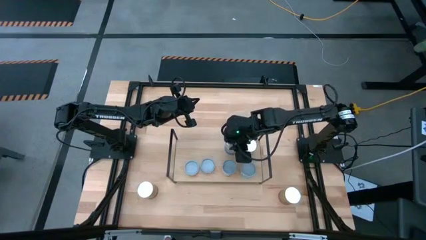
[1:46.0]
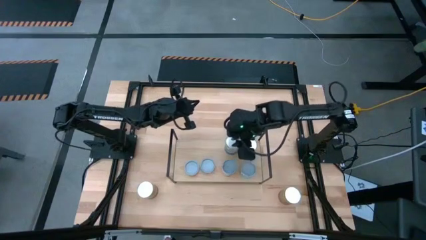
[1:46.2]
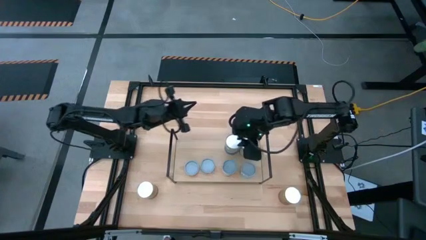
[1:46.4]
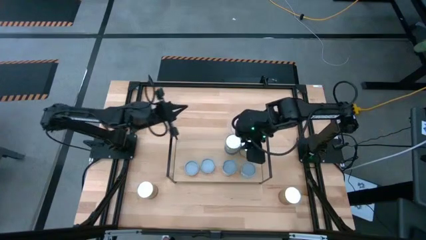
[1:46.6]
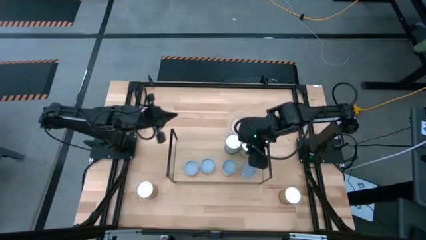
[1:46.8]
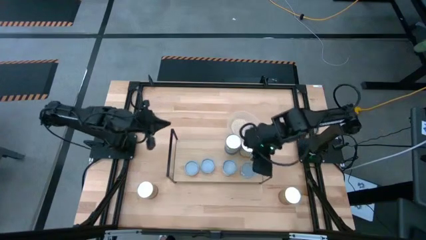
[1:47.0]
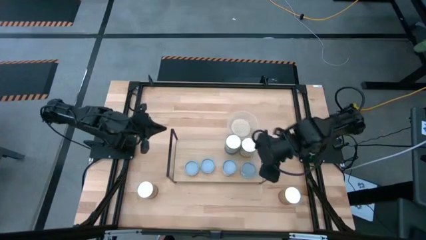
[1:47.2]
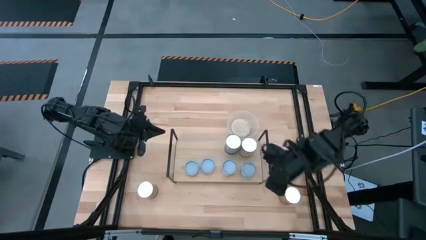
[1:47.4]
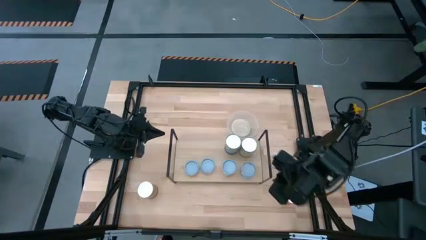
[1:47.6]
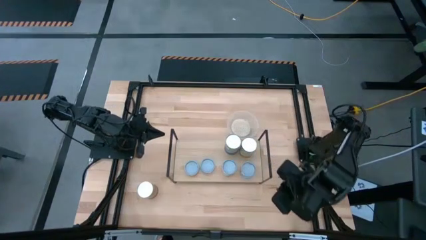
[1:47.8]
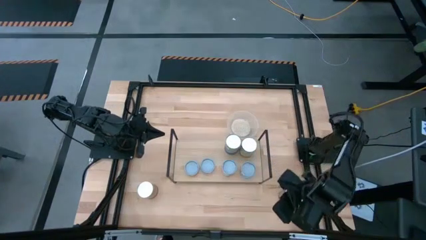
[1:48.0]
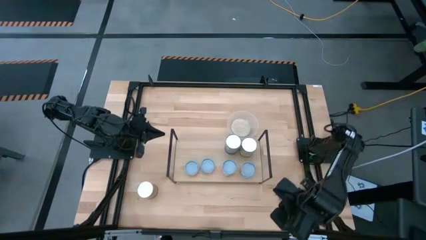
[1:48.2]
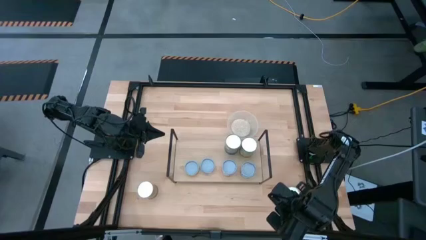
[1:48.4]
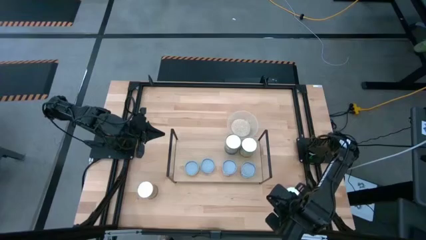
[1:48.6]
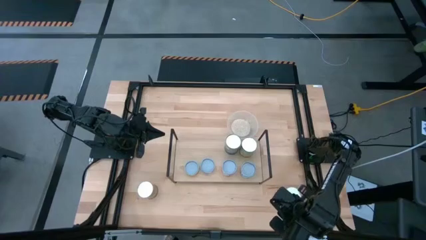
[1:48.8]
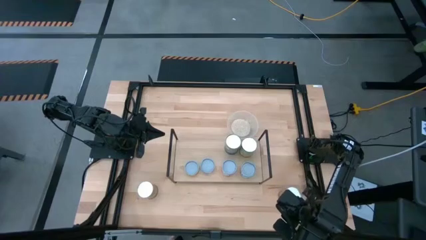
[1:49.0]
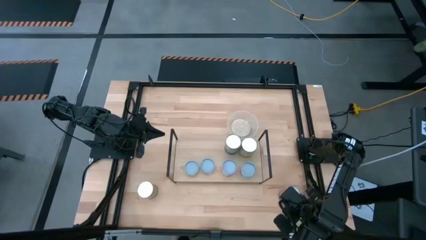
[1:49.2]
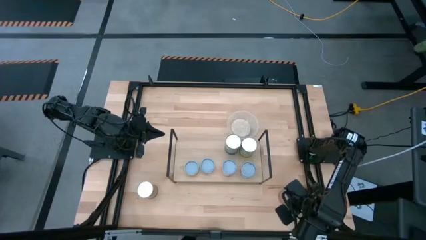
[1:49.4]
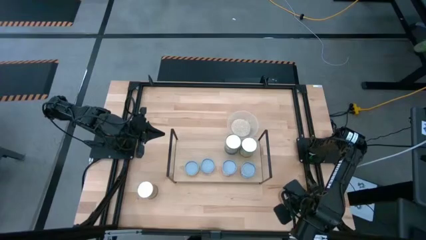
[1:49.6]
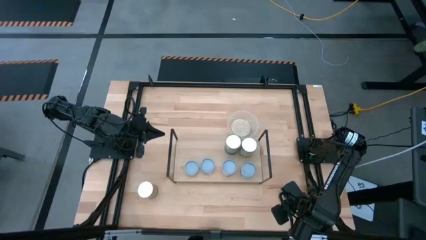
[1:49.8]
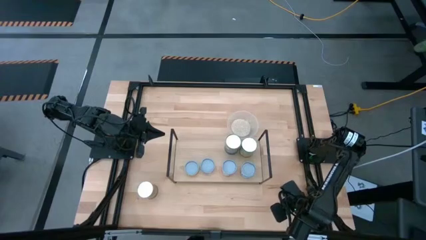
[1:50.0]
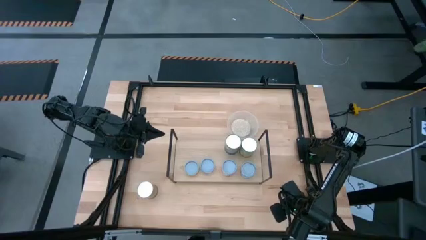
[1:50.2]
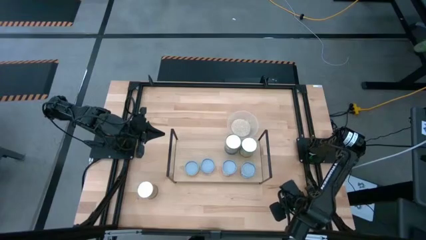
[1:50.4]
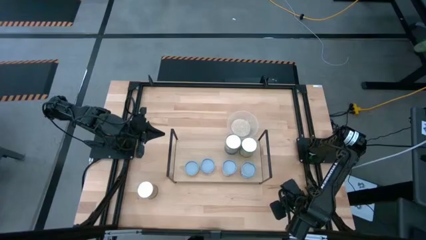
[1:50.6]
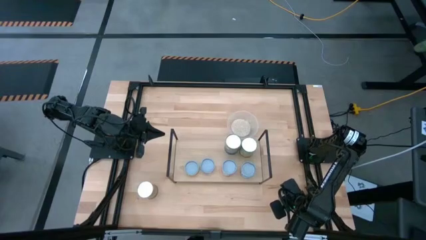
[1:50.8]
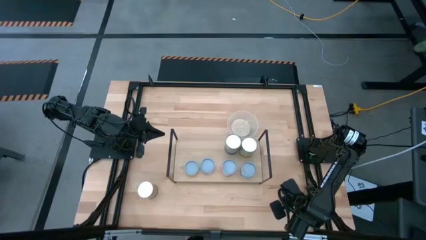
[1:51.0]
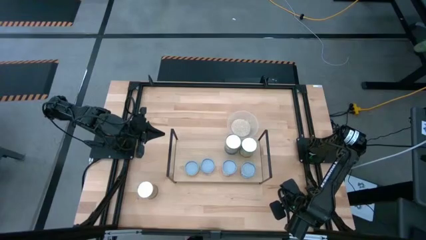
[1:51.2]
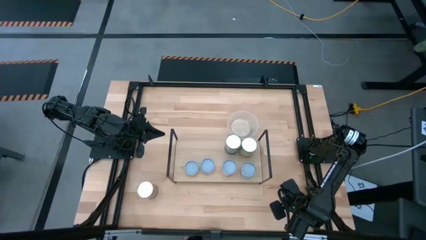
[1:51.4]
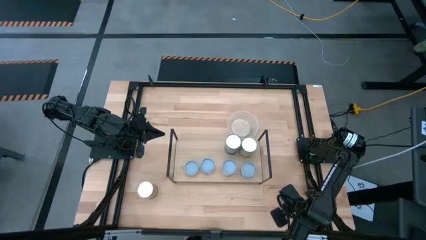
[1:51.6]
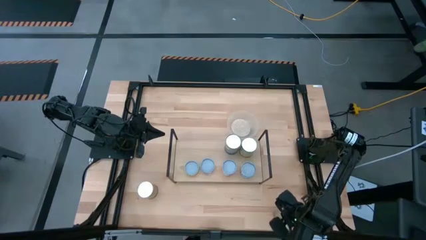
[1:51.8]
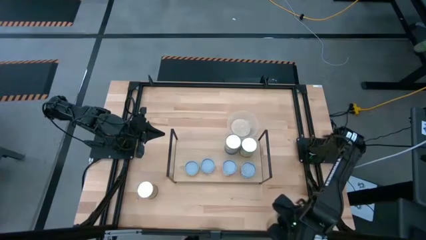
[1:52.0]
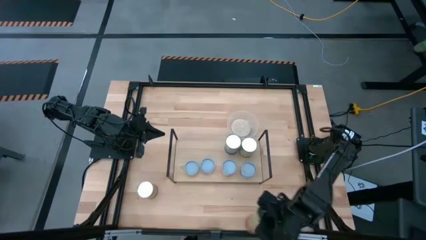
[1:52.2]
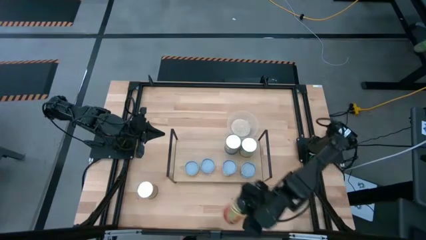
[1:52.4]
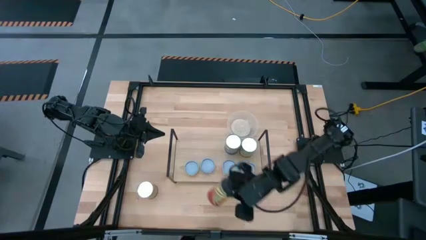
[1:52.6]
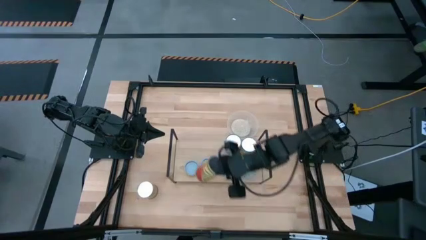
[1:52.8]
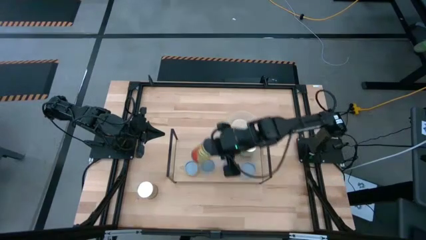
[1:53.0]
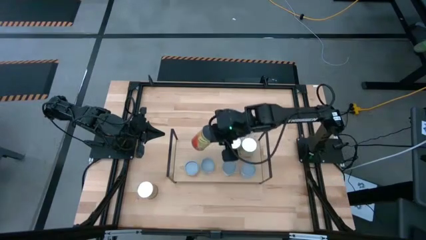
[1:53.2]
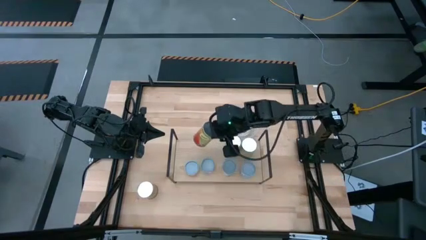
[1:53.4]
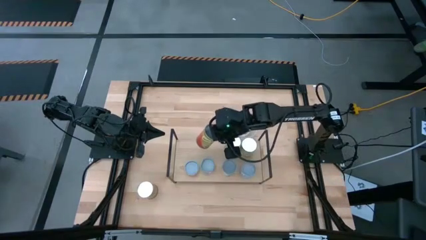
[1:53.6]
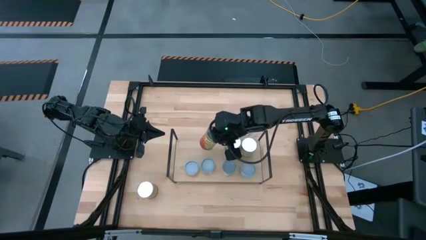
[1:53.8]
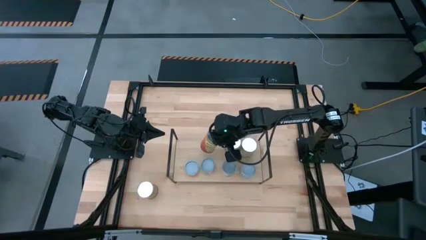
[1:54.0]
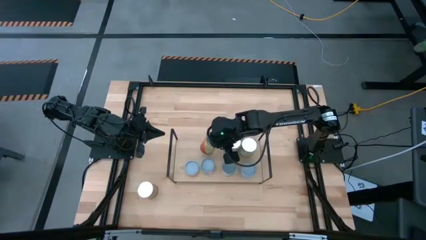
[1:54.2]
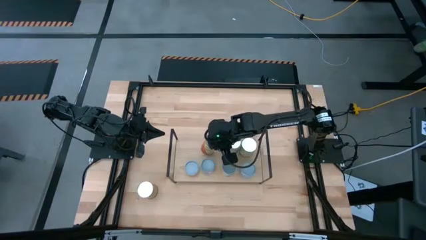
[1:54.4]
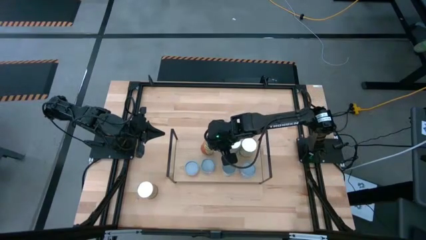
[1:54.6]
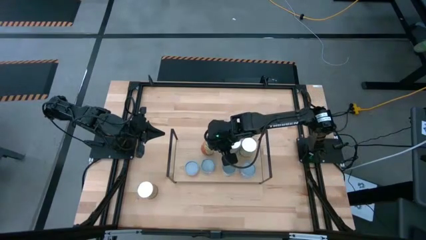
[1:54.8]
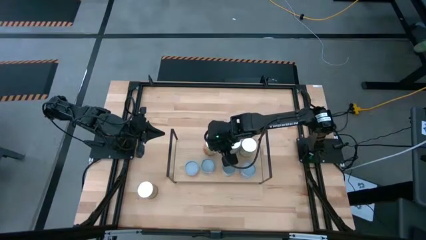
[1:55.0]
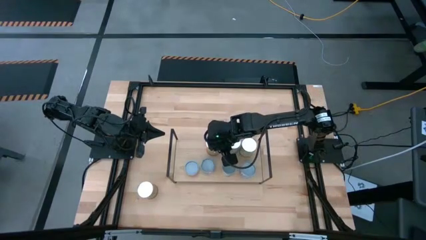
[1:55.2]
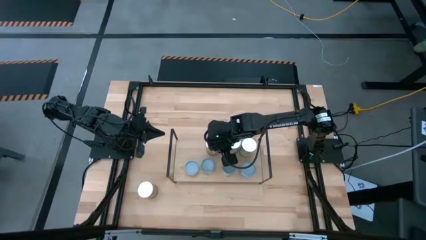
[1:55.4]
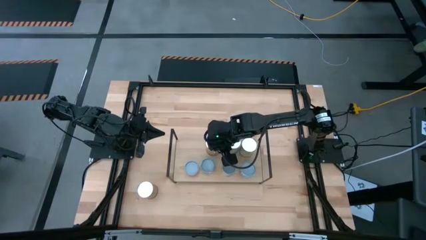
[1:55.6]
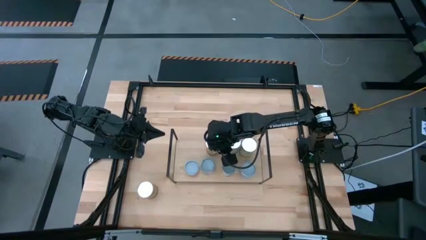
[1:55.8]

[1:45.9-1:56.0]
Task: Pick and place cans onto a shelf
Put the canned green beans on the shelf

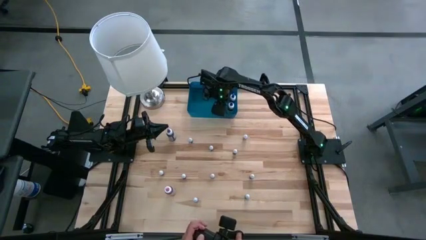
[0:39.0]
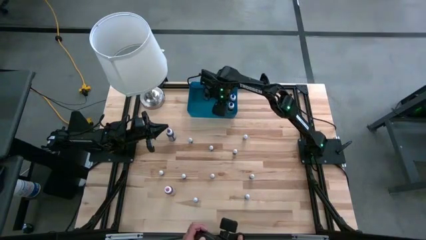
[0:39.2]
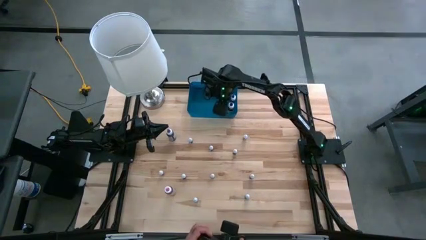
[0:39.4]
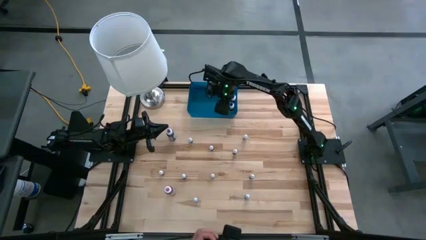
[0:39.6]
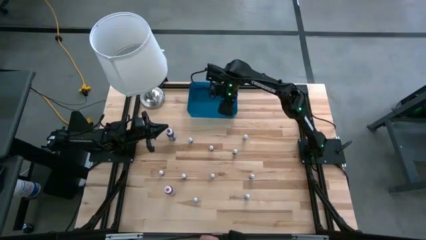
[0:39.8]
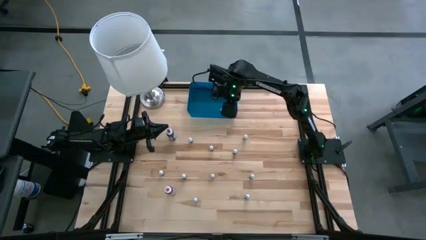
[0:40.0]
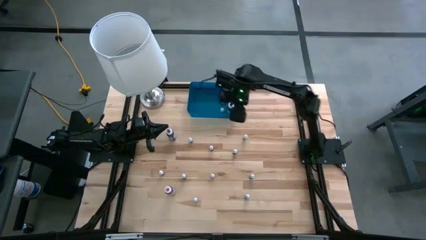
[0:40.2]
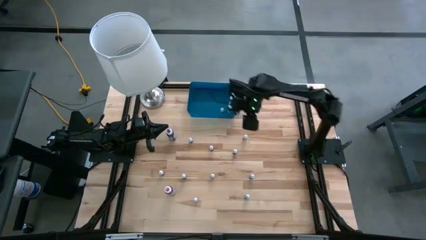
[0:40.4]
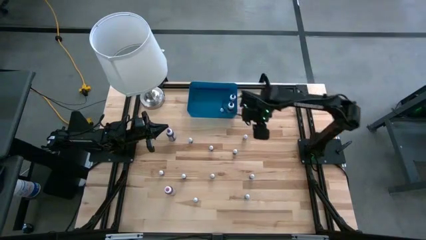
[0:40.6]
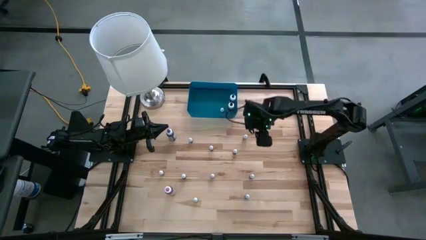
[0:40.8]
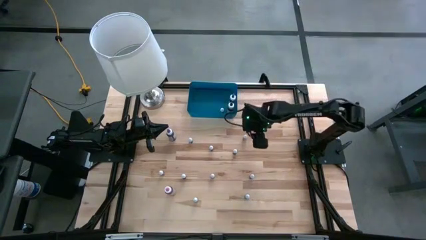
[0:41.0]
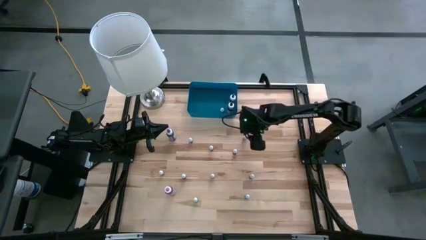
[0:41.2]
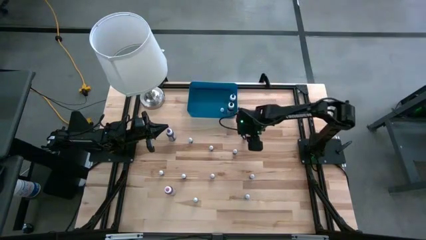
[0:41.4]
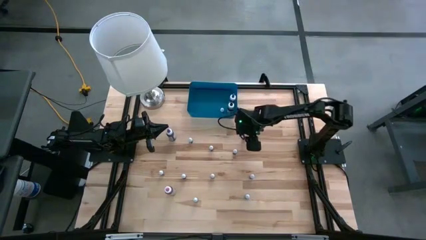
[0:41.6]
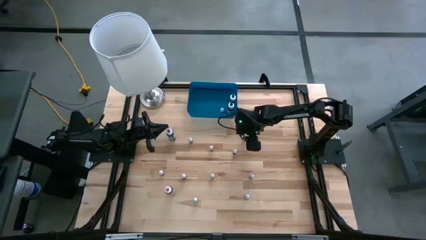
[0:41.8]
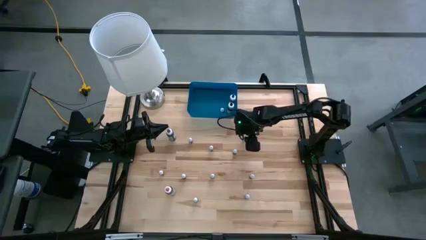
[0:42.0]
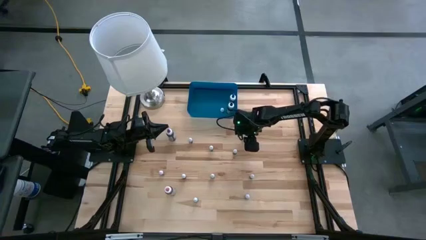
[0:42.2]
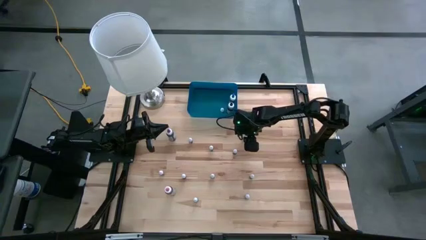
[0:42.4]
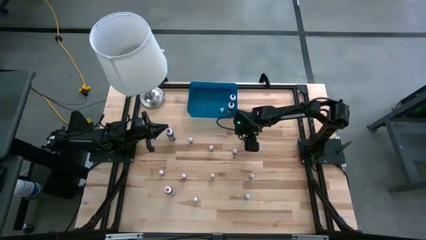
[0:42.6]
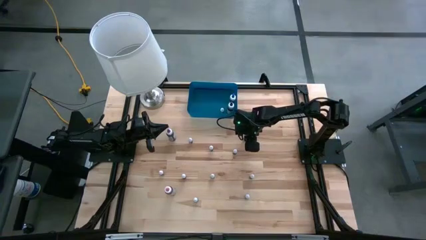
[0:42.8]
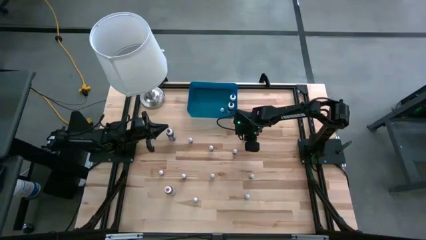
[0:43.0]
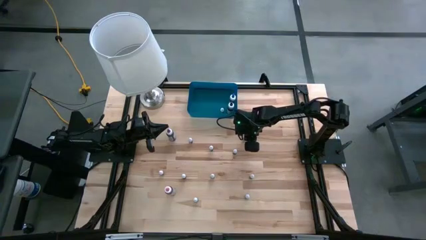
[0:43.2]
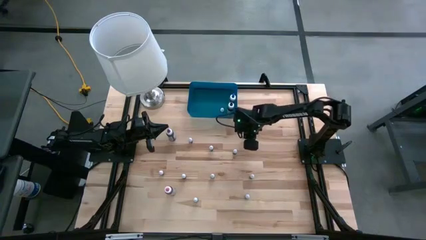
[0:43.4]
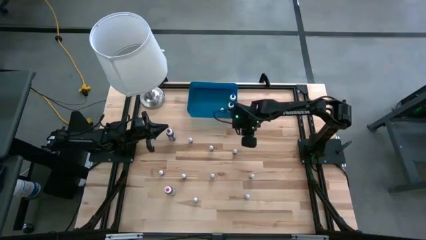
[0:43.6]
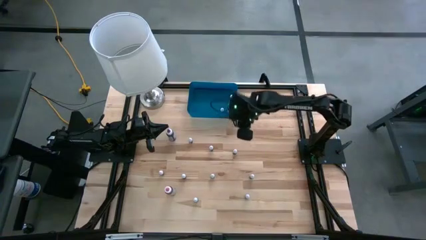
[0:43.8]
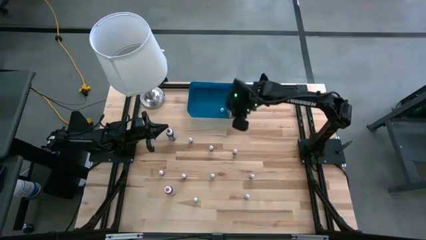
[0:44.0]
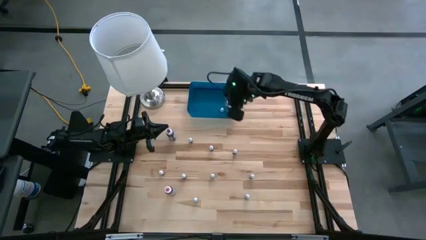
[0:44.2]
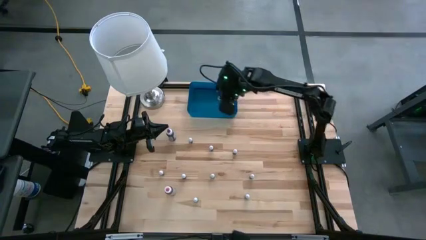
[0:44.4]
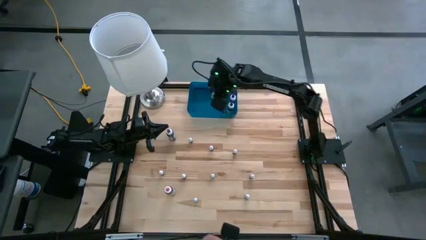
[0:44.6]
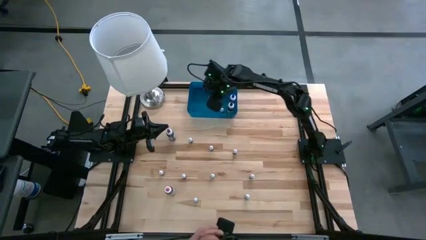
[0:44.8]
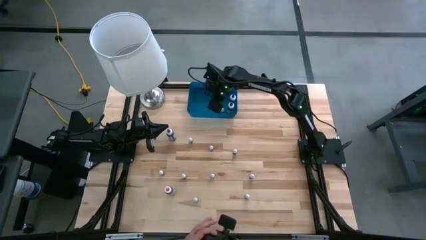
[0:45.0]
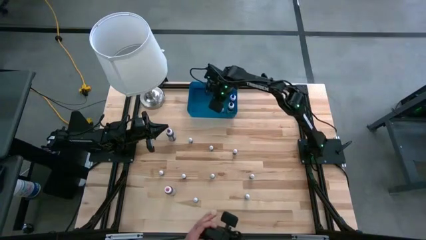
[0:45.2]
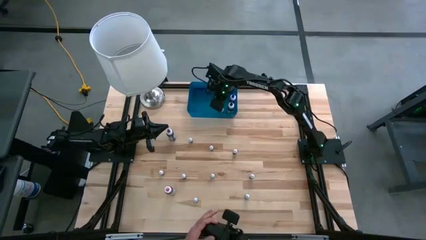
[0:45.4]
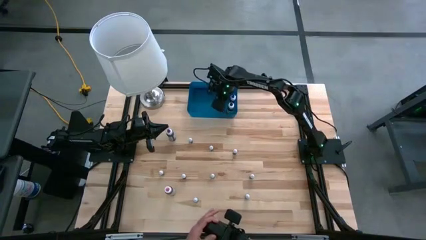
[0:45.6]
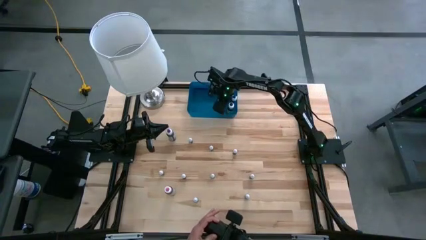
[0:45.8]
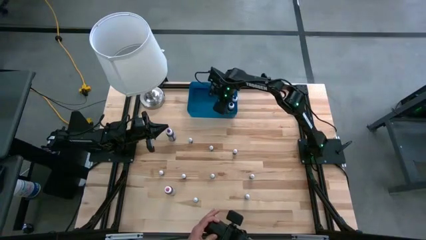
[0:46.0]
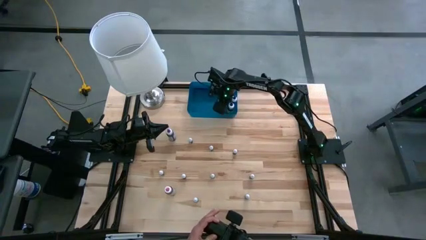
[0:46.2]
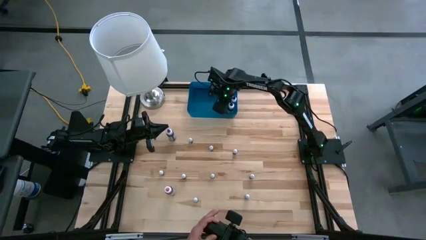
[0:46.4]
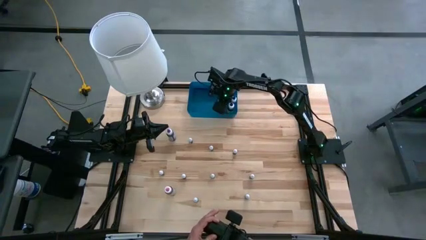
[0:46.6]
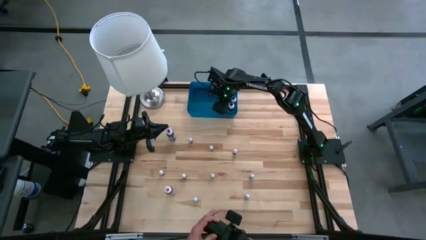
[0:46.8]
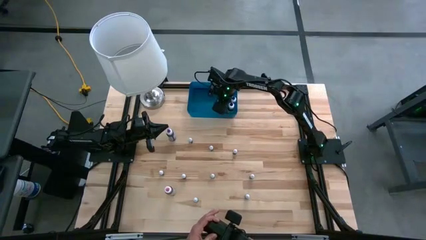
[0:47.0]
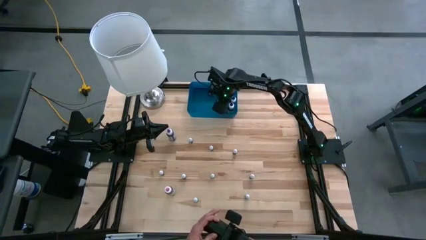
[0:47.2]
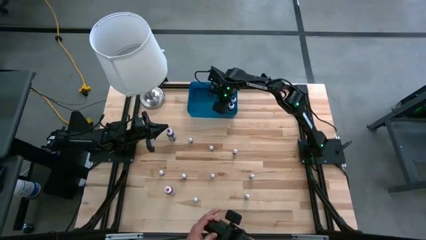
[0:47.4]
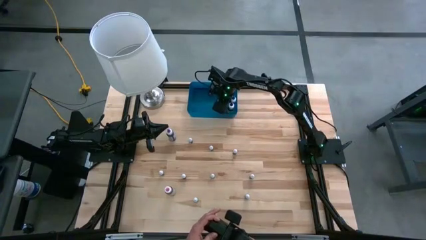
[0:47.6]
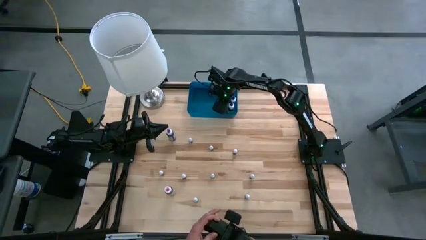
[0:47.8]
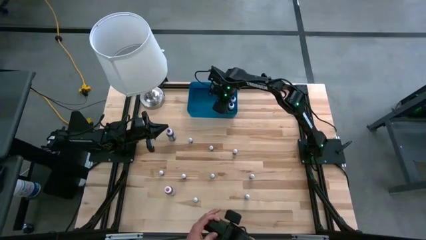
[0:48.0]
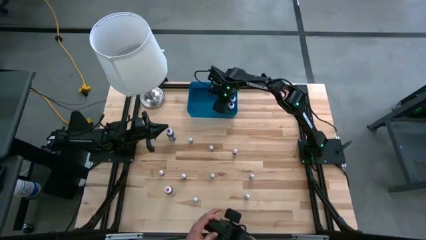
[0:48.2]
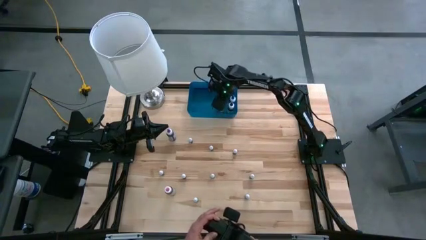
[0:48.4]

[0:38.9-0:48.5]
Task: Pick & Place food coloring
Put the small green food coloring bottle into the blue bin
